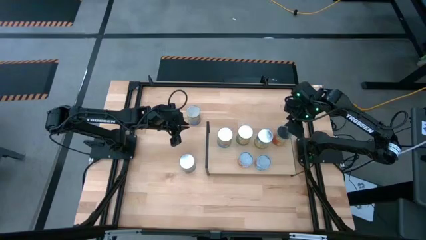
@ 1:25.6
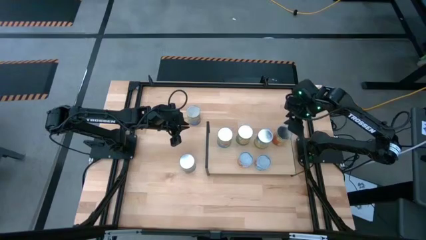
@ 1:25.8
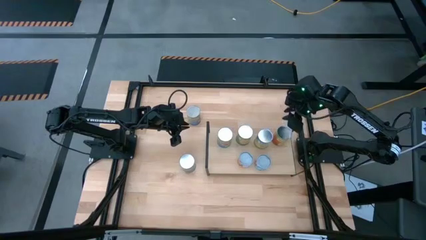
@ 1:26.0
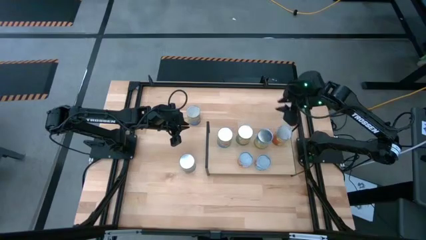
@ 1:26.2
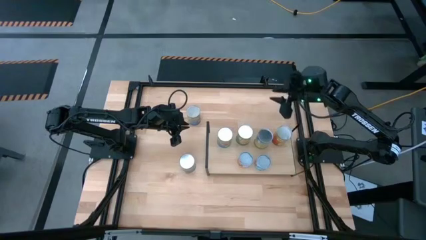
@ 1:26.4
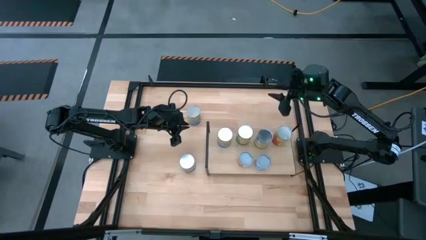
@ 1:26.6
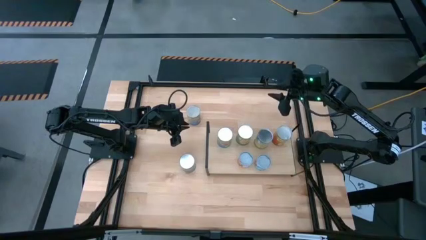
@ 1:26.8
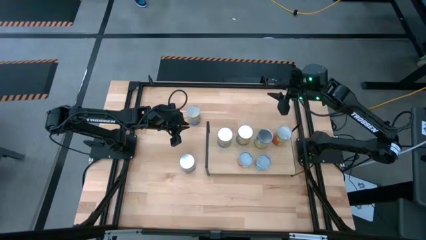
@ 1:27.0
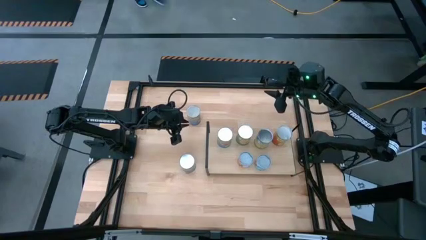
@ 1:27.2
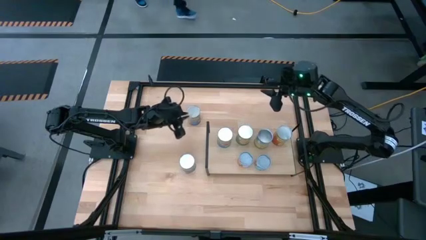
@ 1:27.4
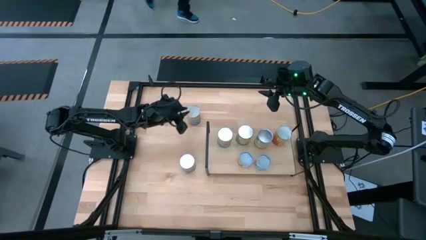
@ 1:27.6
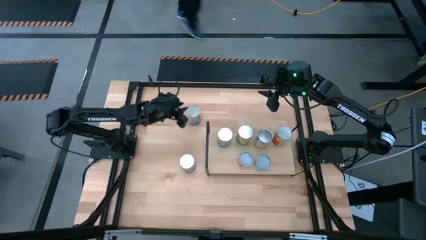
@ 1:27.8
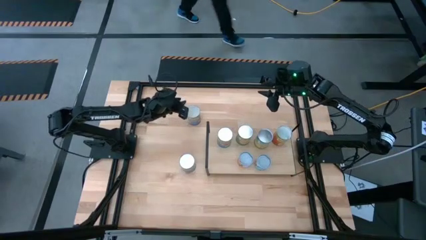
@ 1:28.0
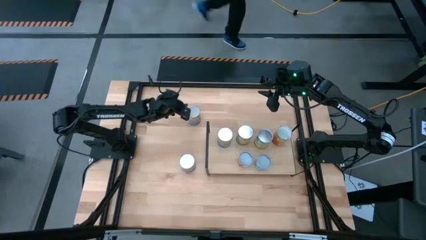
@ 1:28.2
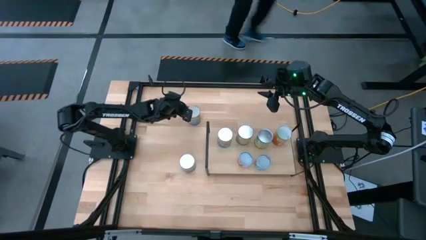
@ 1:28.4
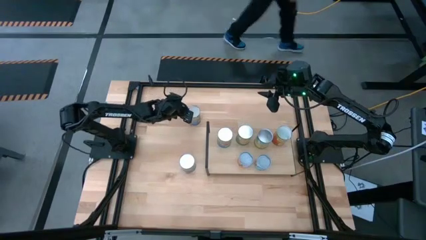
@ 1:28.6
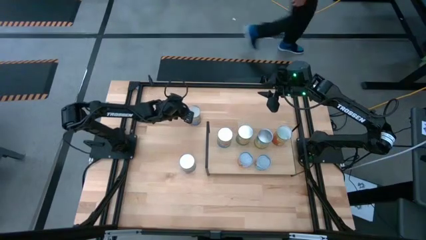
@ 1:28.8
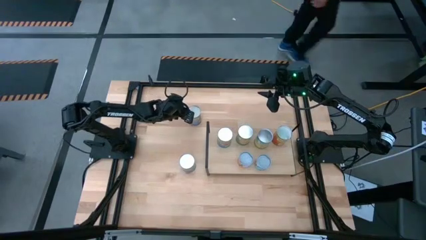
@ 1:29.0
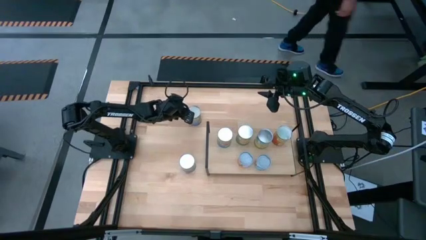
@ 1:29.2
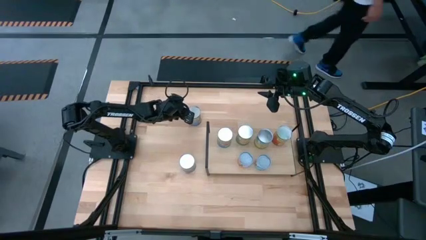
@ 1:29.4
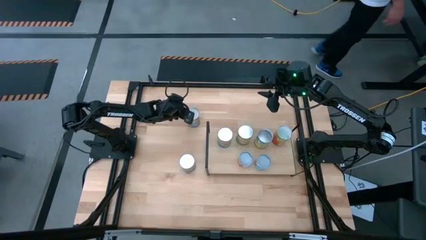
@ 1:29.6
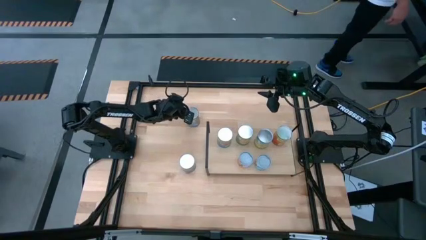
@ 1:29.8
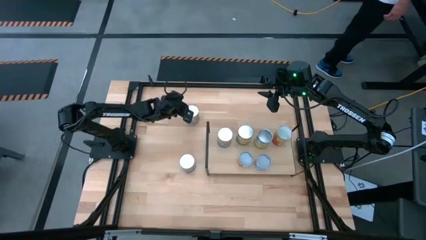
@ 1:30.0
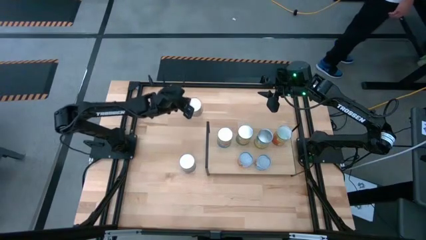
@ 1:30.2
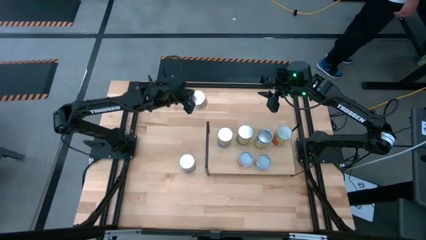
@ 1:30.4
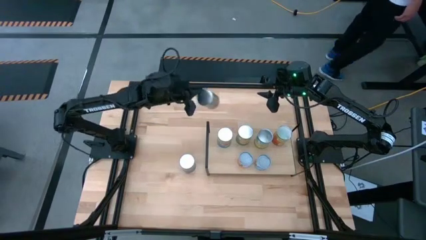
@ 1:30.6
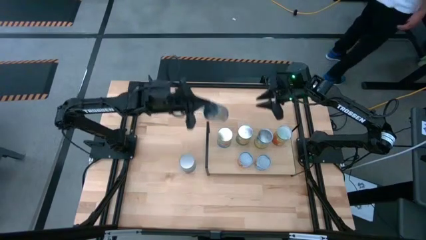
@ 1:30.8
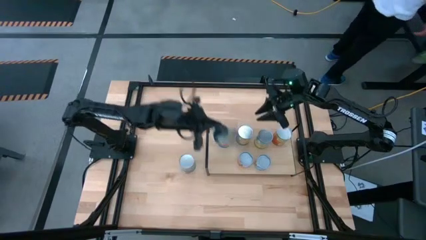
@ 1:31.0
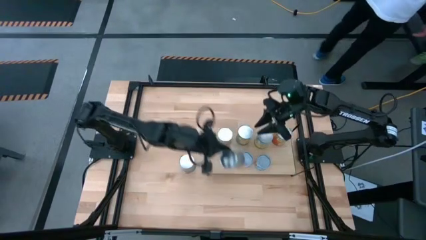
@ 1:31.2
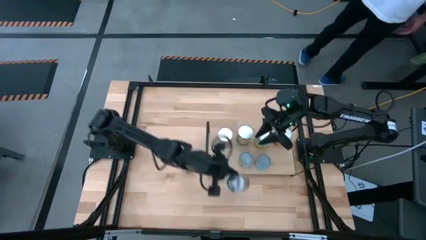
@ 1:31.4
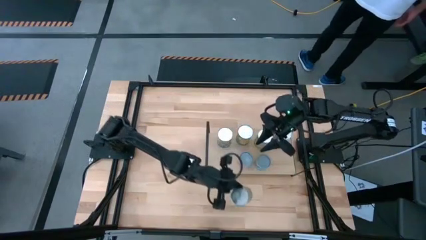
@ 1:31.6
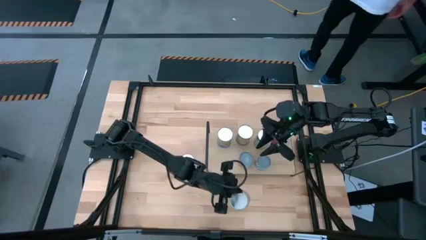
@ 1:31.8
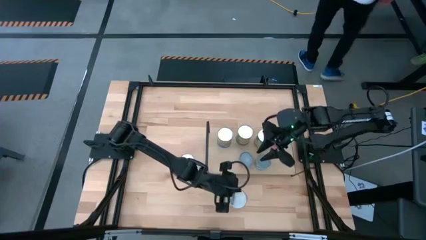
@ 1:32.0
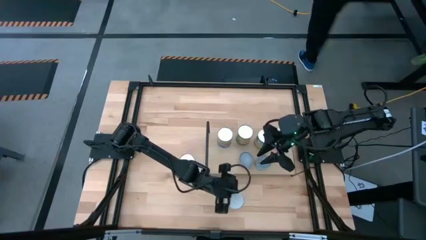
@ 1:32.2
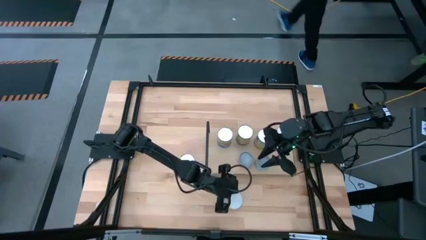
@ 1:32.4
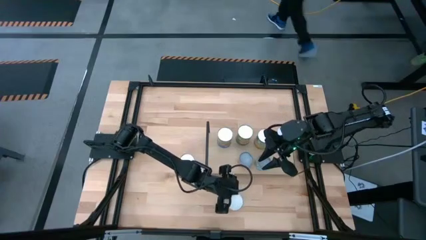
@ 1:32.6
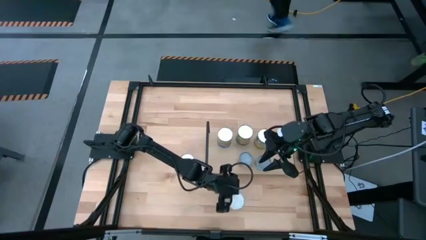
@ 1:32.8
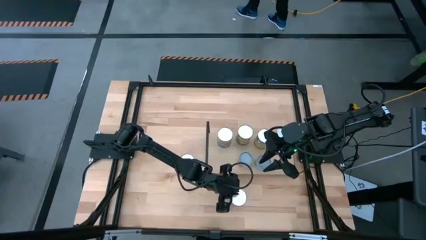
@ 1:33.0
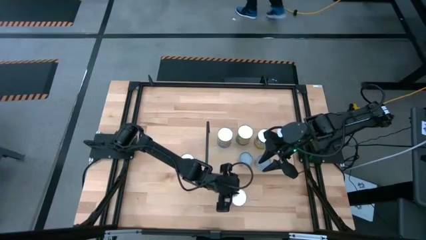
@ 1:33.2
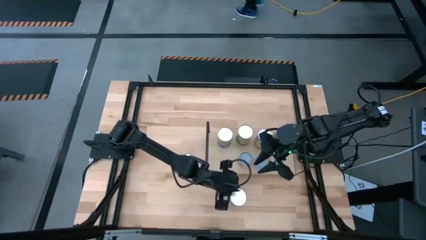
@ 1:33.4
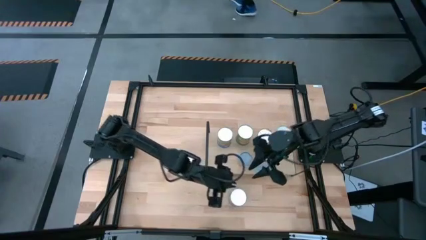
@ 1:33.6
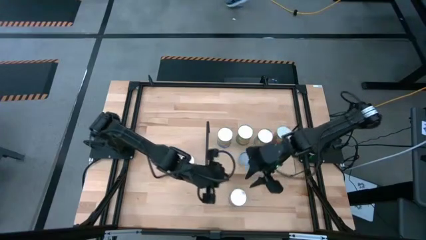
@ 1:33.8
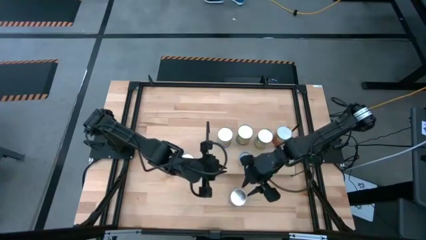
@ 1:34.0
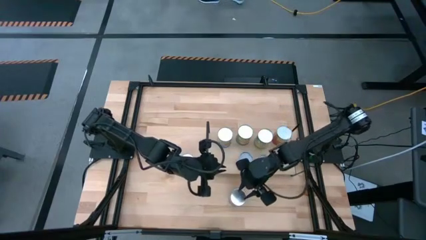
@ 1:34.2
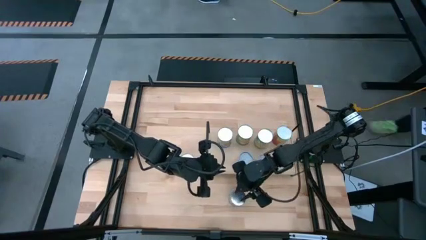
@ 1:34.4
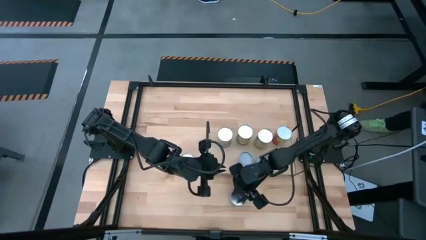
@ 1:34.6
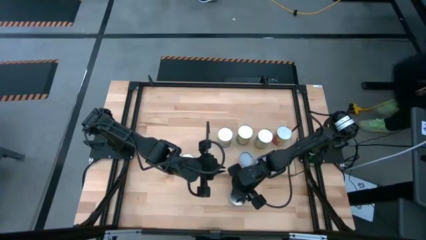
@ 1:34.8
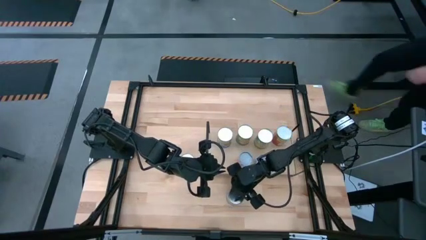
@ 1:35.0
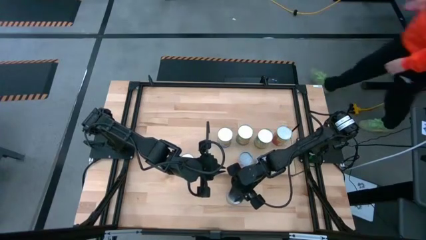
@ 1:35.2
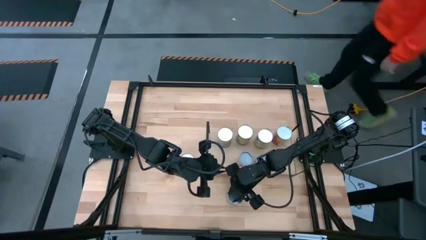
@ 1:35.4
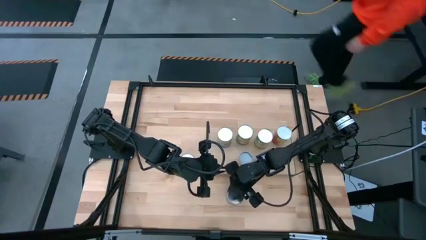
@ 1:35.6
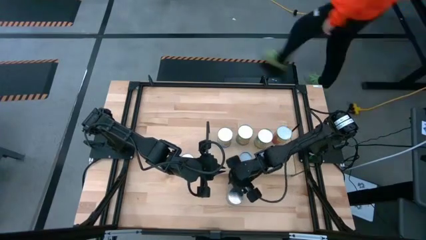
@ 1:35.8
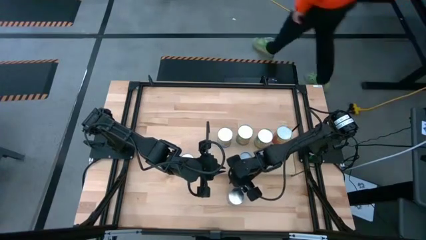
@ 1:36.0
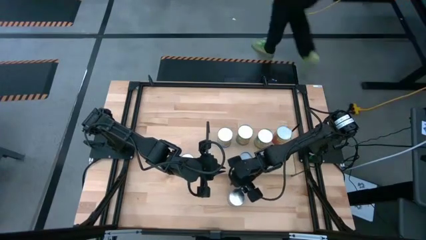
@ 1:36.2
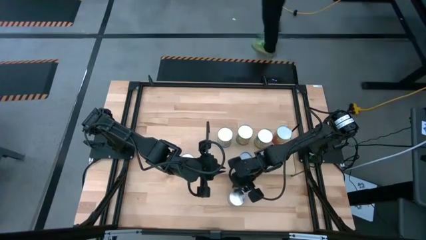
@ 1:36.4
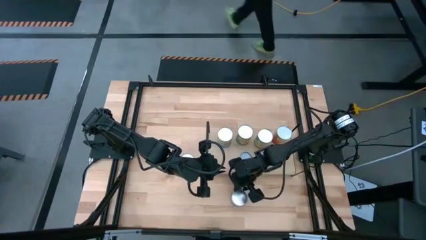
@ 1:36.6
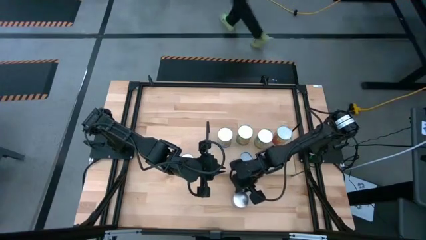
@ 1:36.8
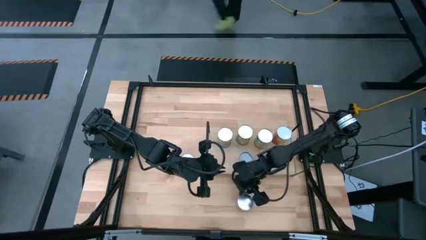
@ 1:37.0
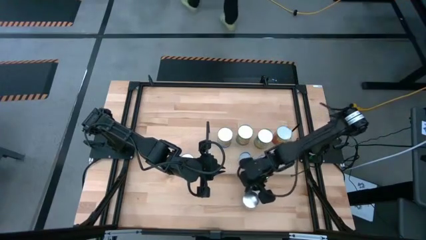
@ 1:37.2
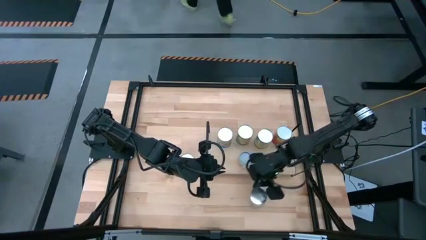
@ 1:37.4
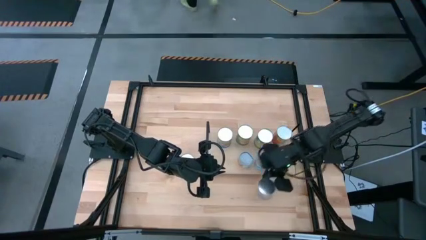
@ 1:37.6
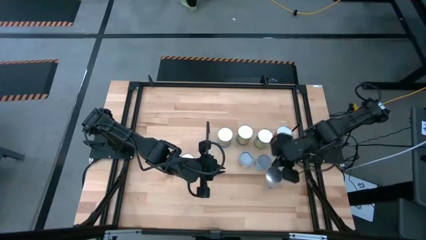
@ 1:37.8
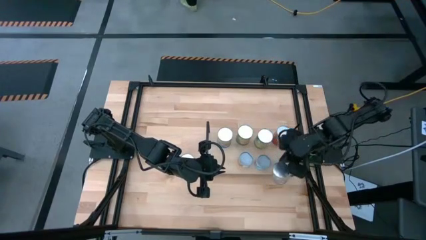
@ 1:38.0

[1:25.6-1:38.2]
Task: Pick and place cans onto a shelf
Put the canned peaches on the shelf
